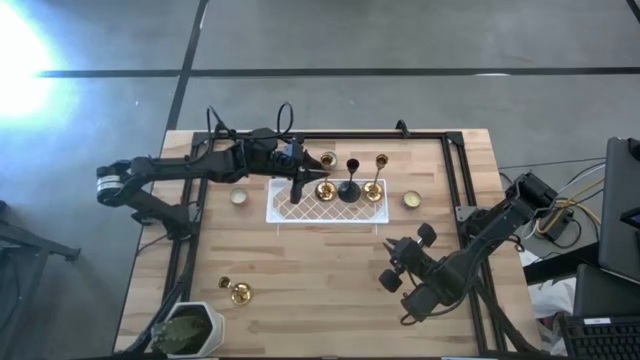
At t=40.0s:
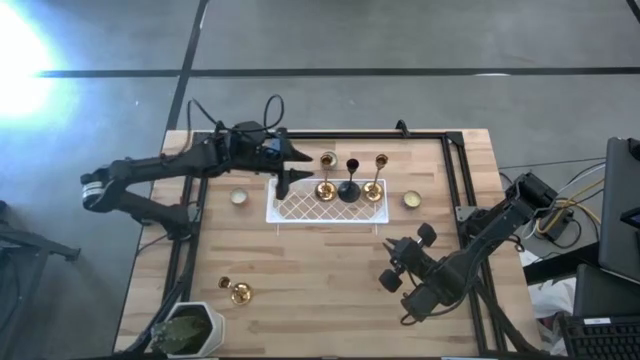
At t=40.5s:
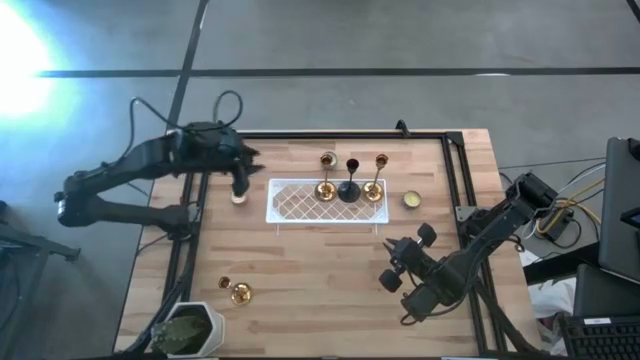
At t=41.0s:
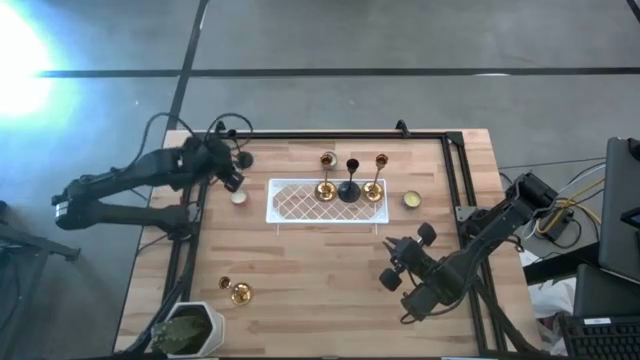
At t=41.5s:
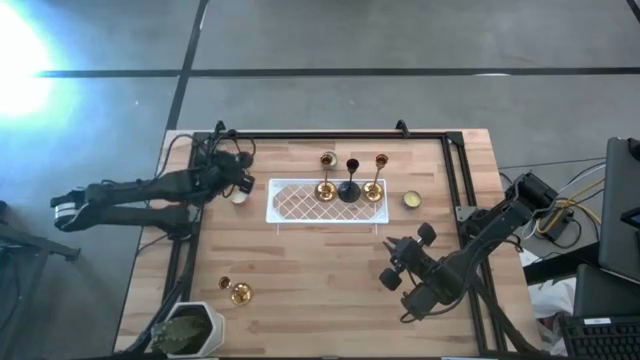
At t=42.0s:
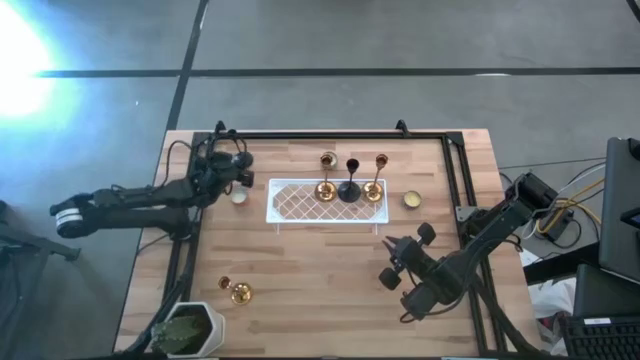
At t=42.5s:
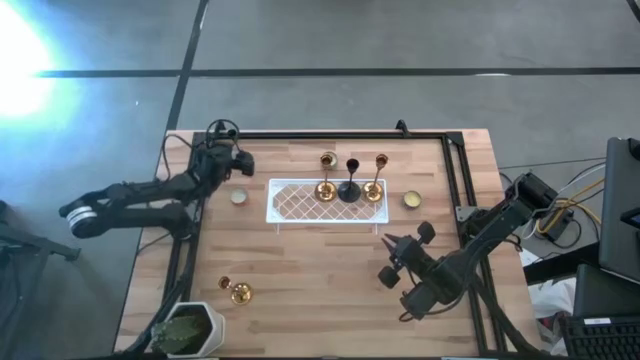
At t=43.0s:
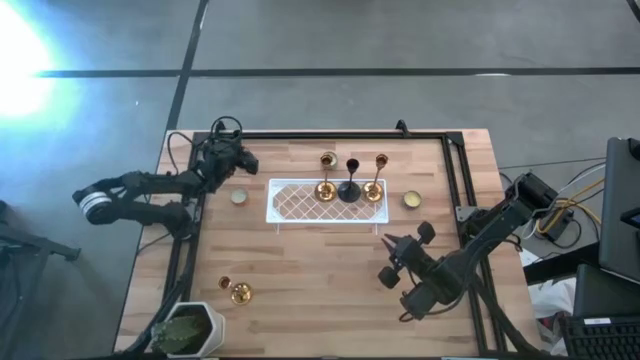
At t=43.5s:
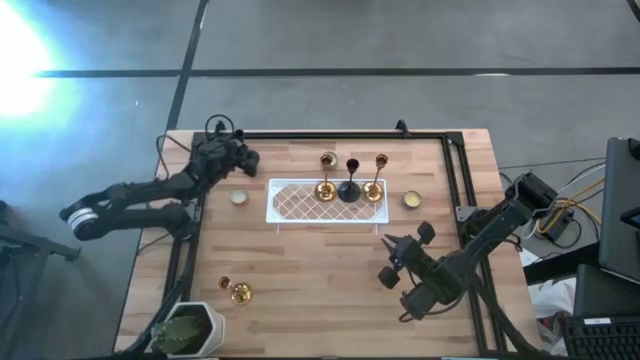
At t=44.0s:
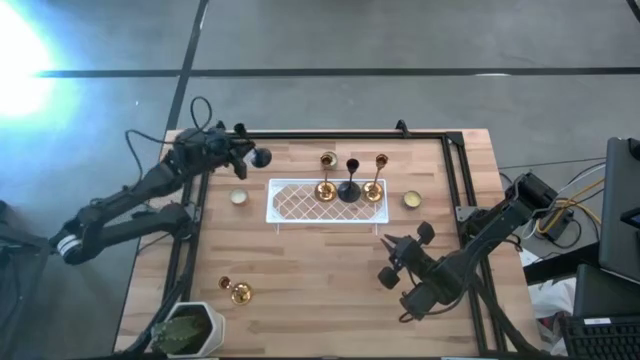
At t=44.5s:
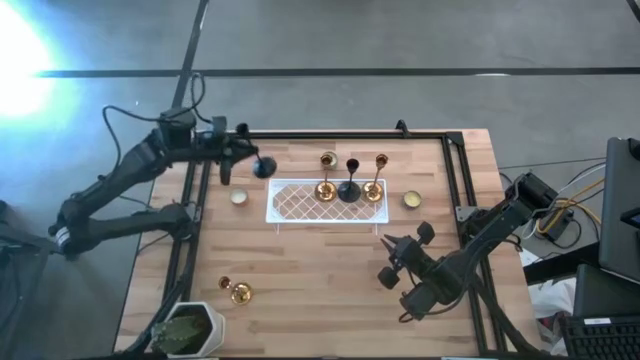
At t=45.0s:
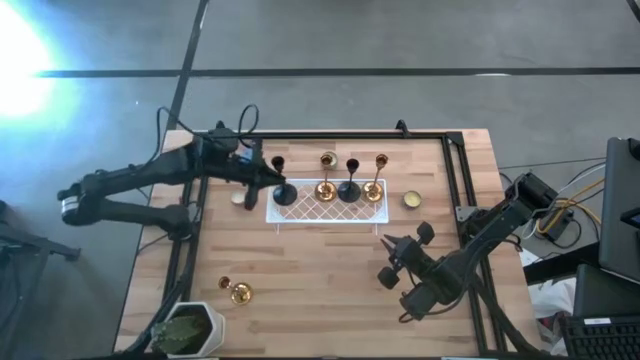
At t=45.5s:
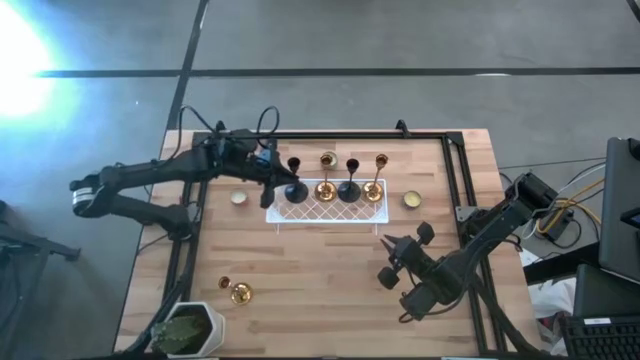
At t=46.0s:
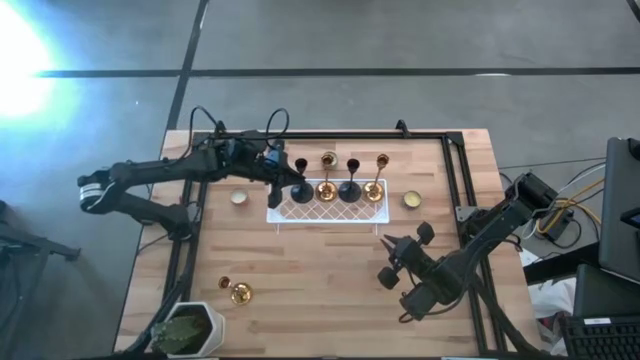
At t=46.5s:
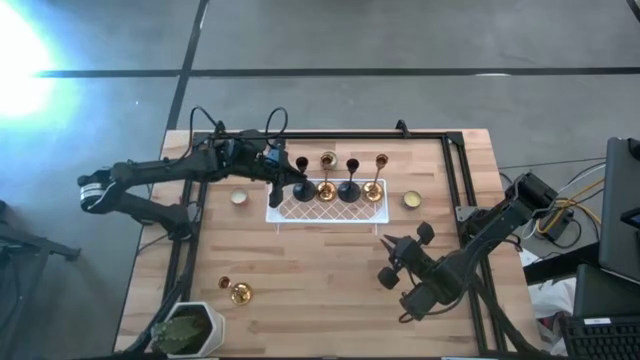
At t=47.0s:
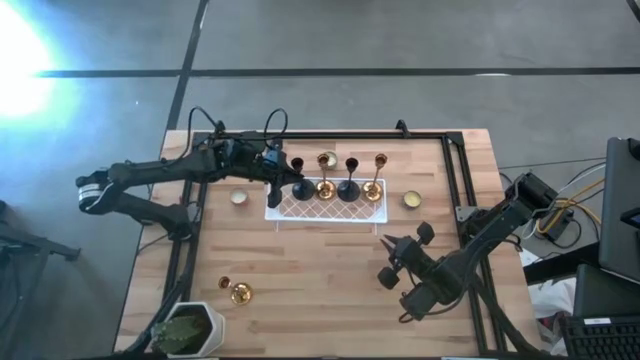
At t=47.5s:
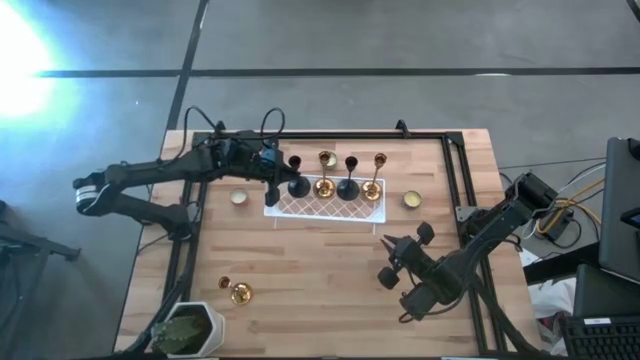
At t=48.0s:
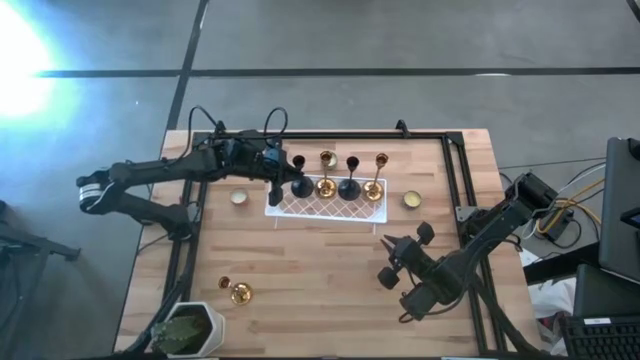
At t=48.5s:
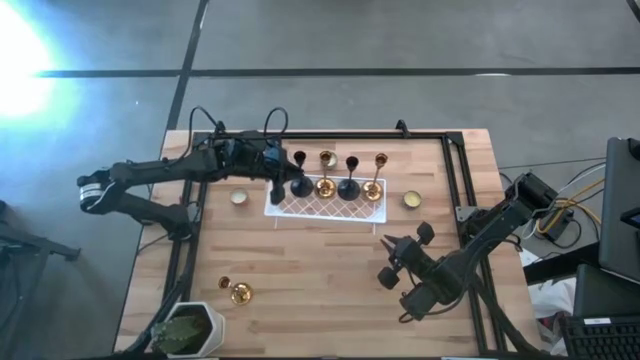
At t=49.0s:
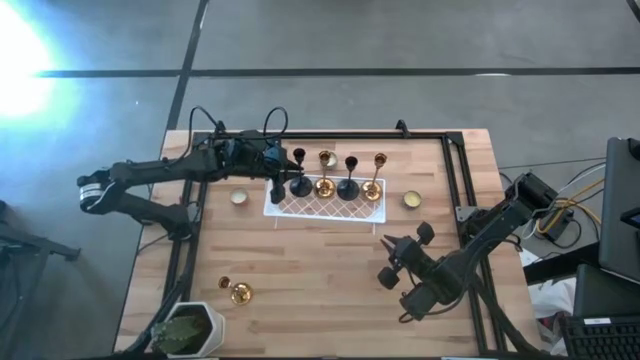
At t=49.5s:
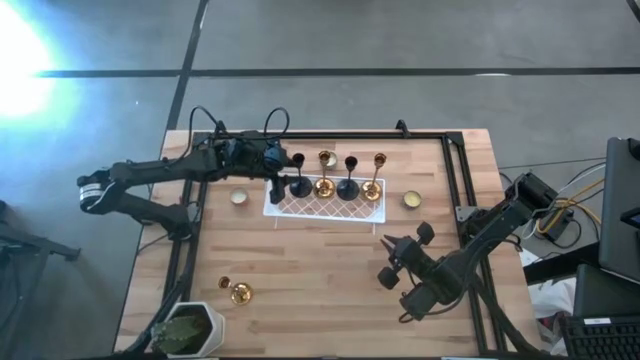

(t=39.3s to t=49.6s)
Task: Pick & Place candle stick holders
Put the black candle holder on the shelf

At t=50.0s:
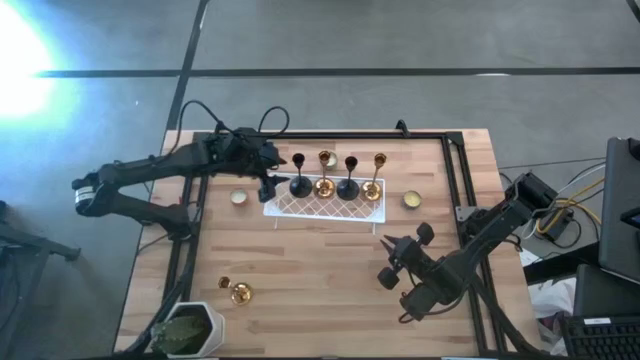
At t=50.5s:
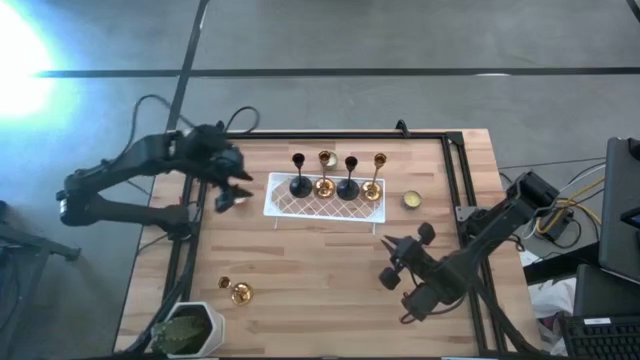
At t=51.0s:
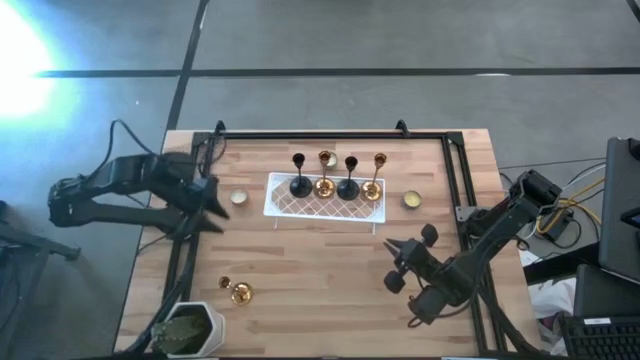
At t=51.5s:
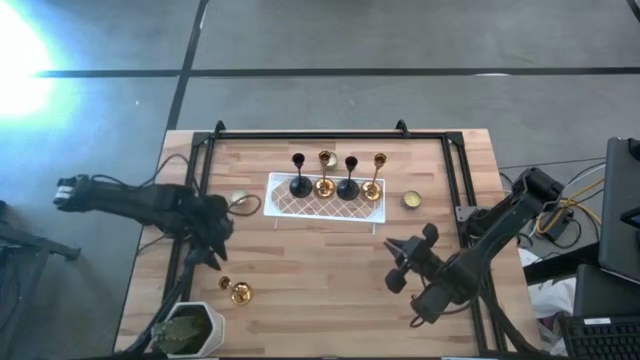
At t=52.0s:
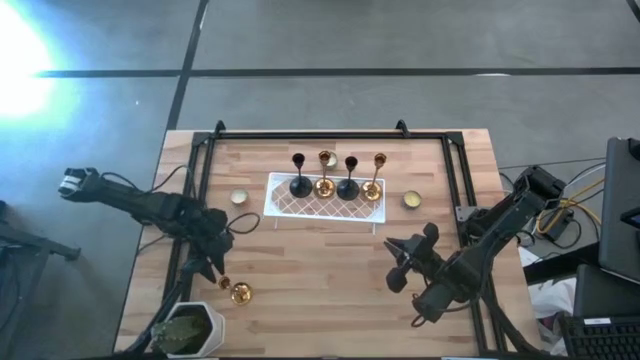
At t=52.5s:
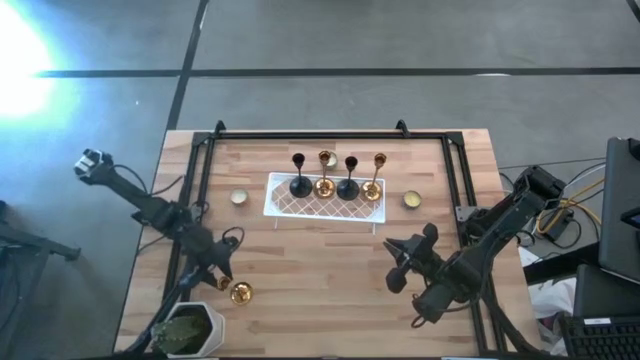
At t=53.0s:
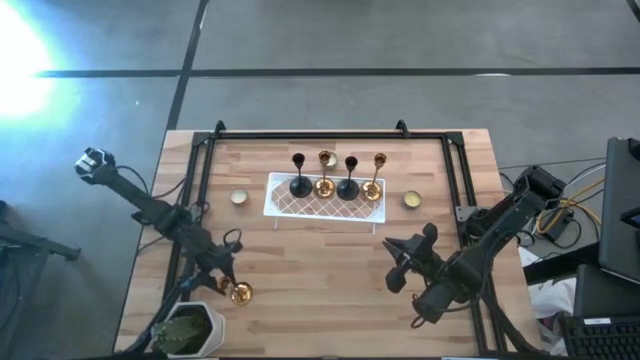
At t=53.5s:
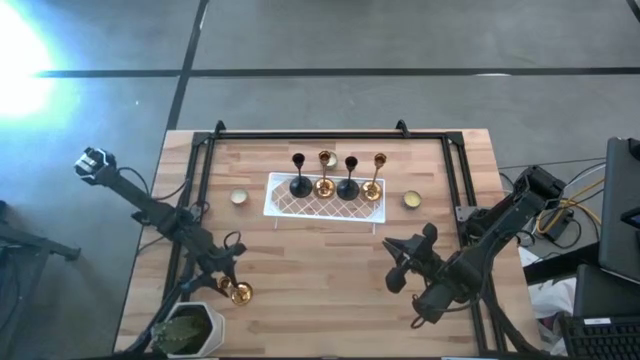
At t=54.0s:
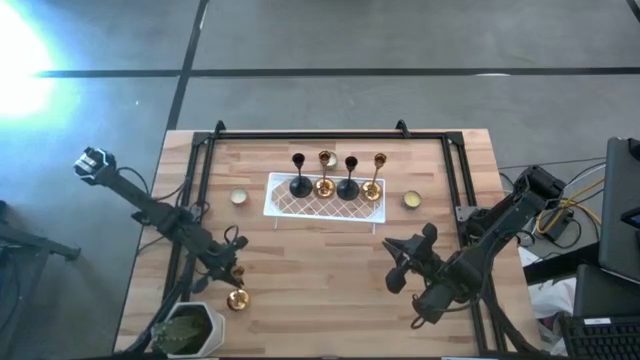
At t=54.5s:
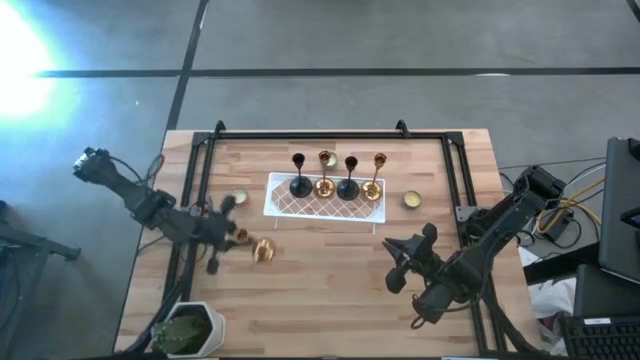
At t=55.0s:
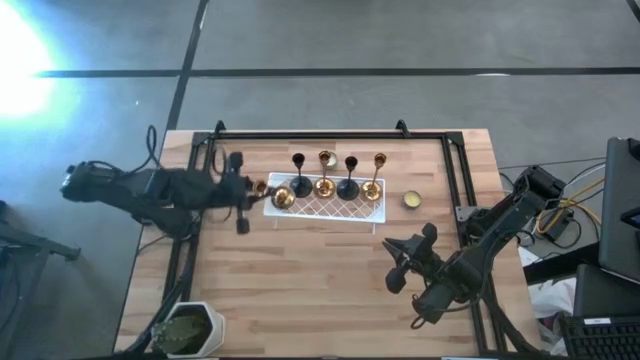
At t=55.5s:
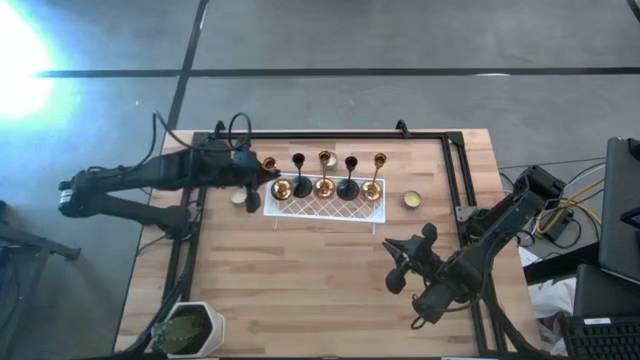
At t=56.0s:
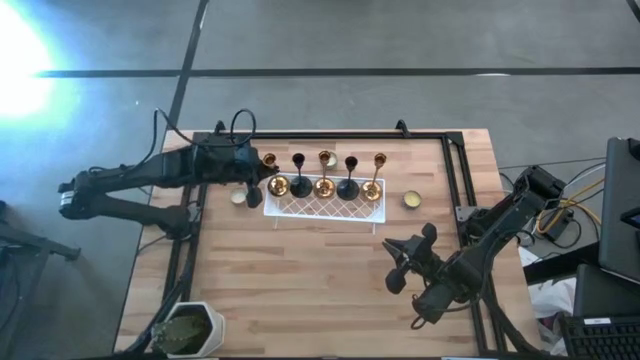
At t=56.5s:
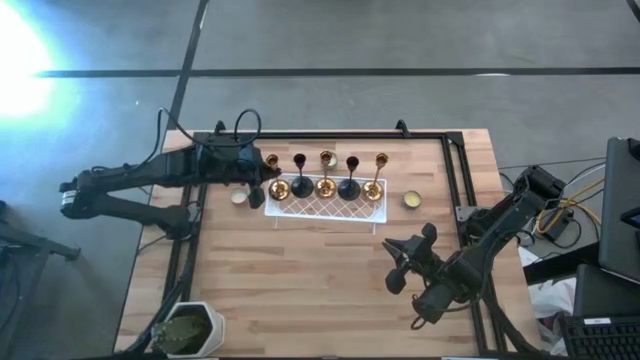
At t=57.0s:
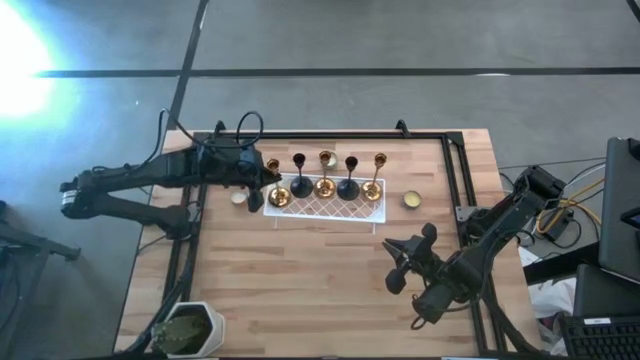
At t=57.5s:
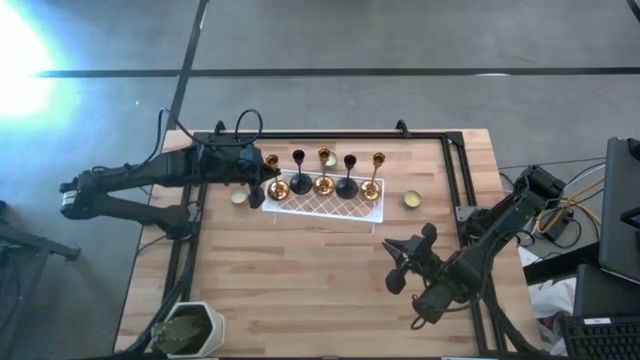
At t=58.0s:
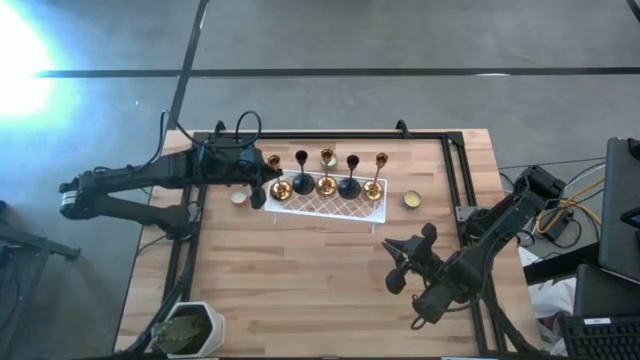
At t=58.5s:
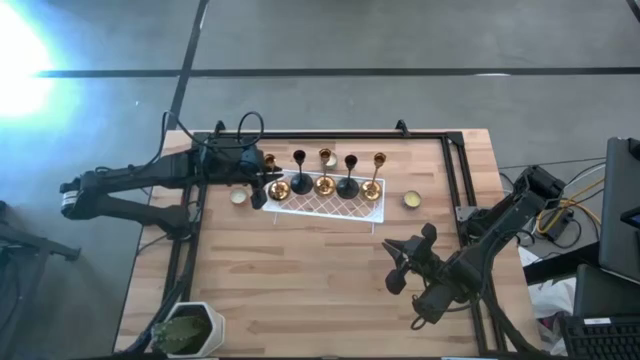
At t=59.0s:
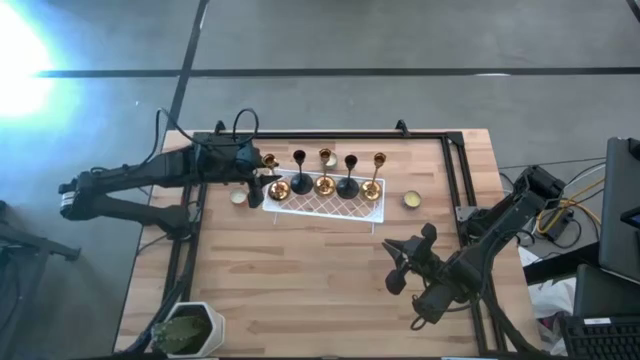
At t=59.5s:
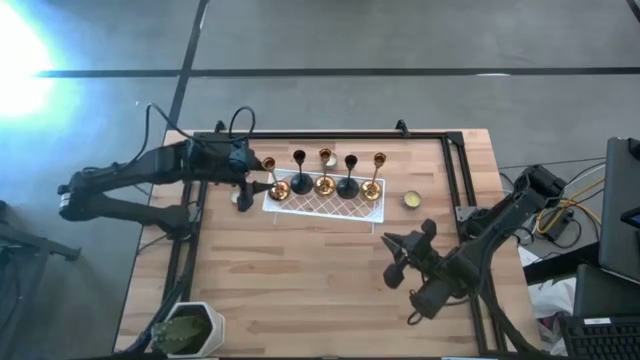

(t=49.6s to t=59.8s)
Put the golden candle holder on the shelf
